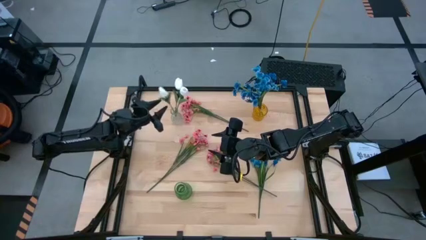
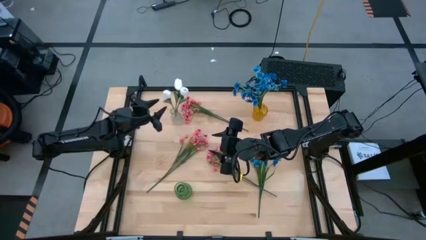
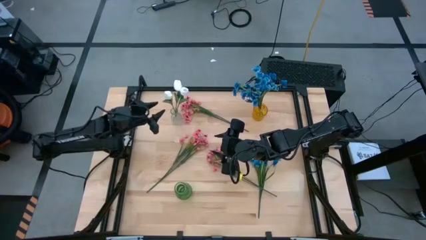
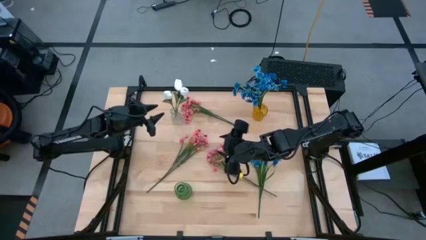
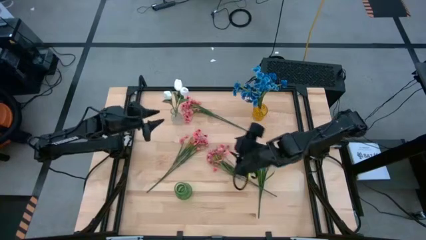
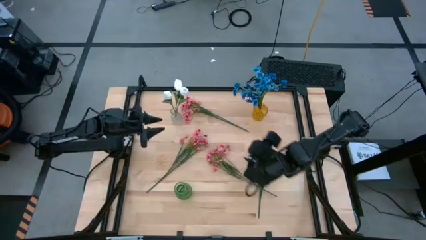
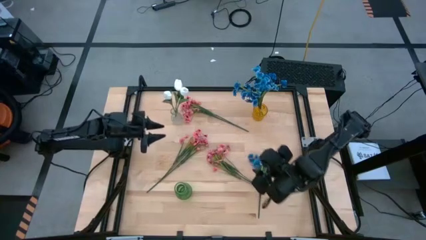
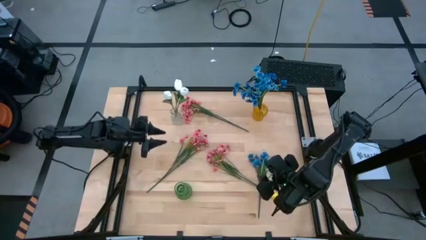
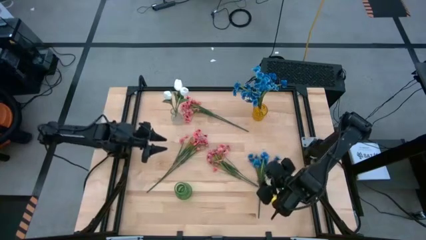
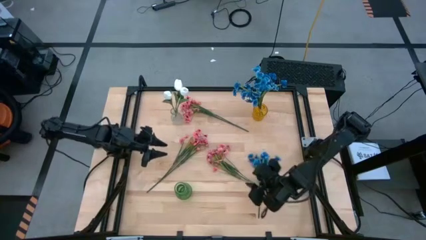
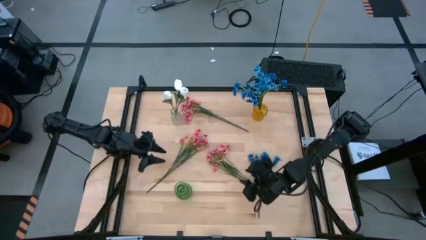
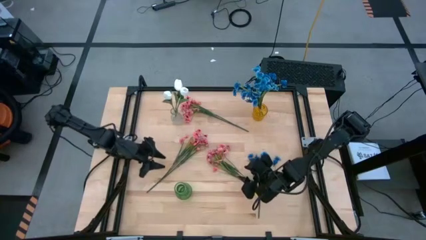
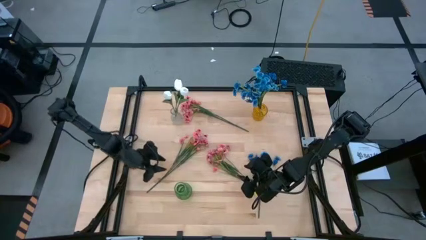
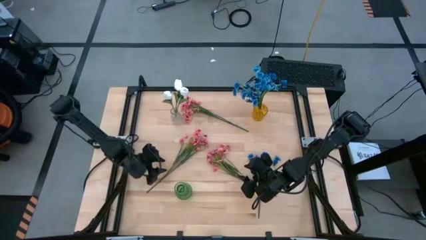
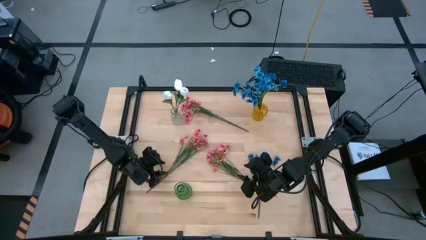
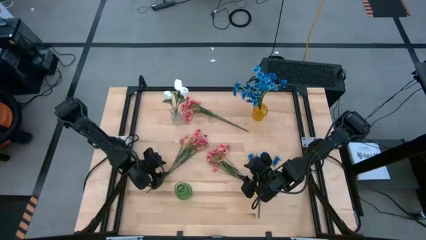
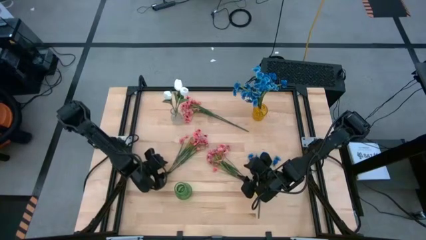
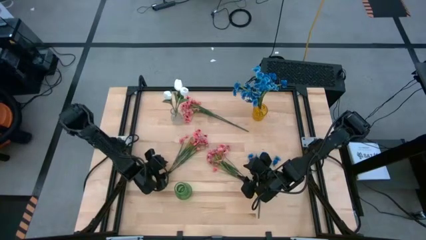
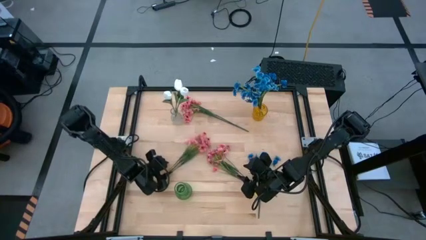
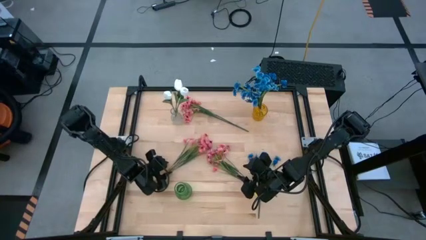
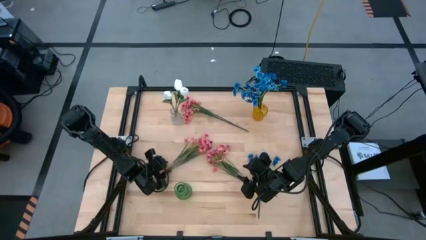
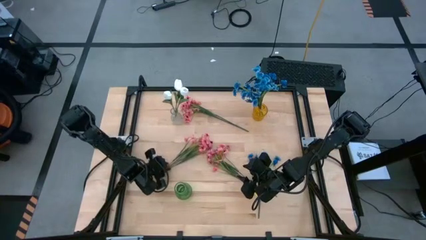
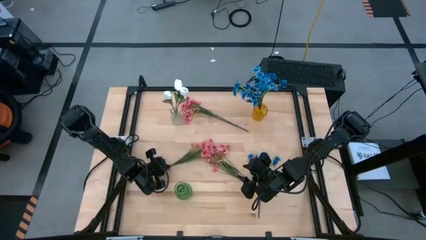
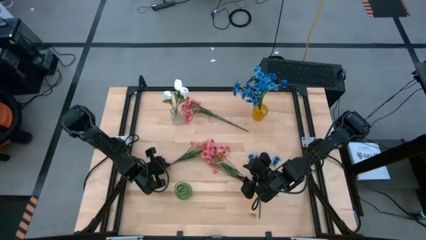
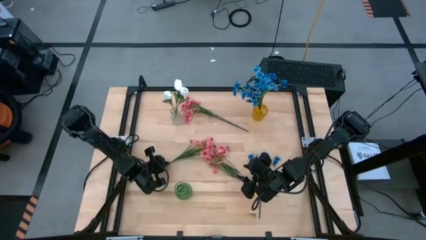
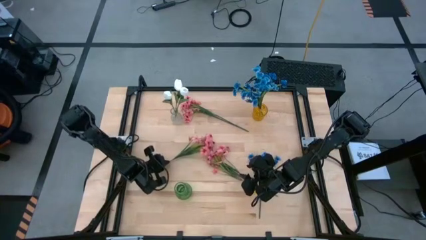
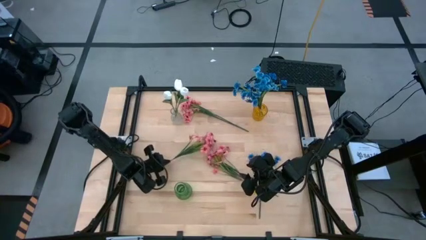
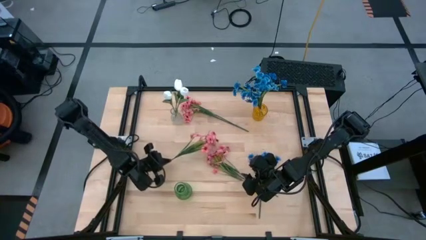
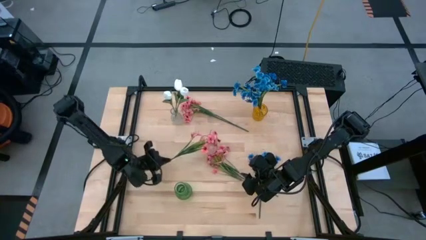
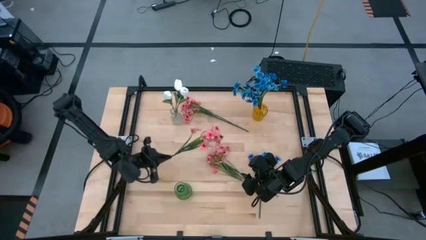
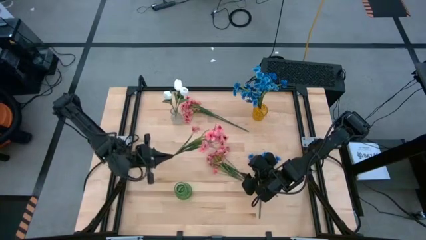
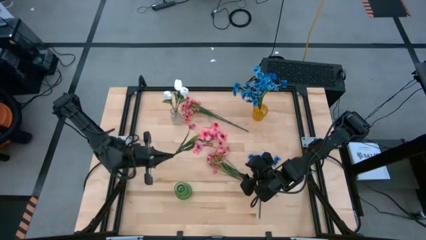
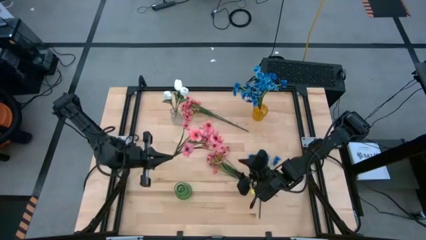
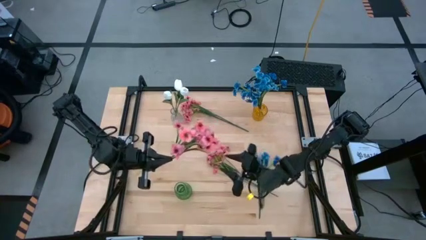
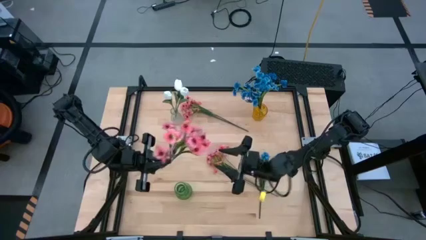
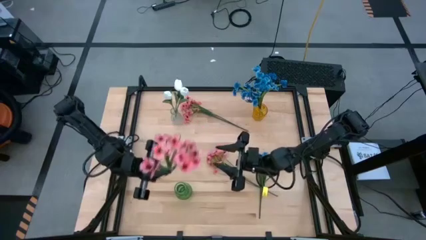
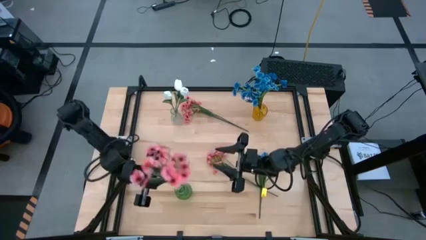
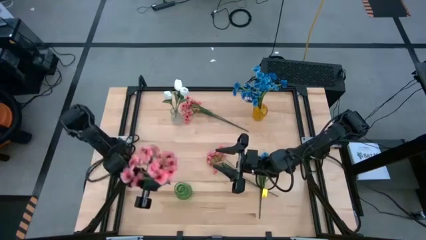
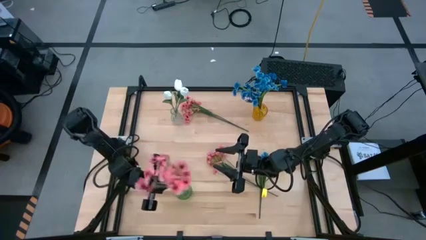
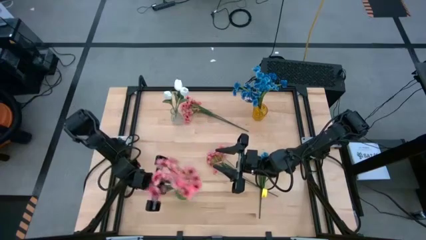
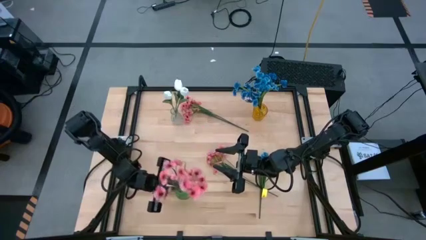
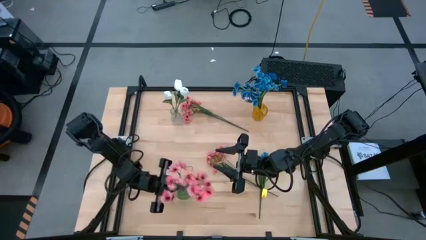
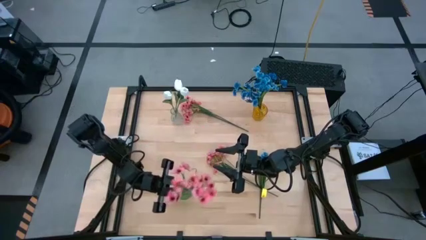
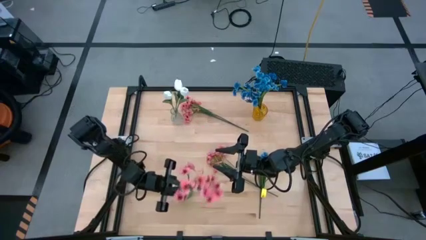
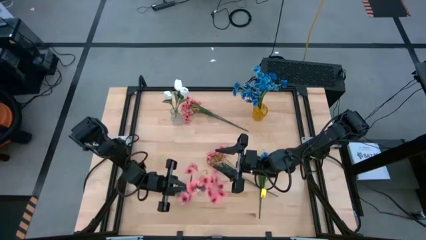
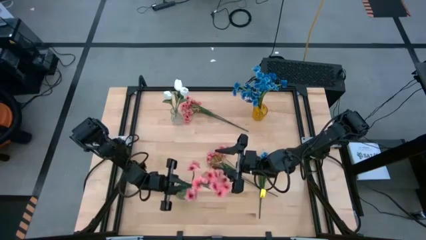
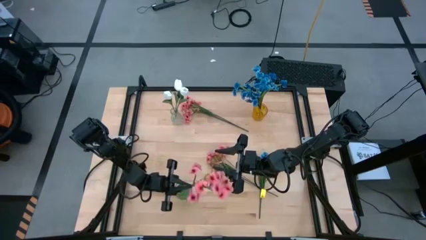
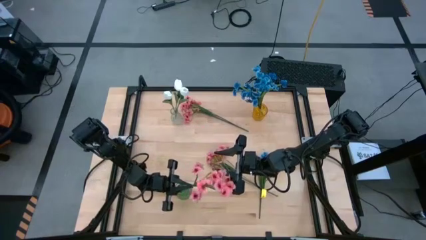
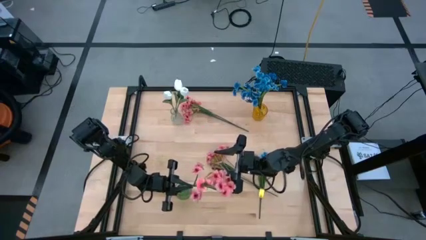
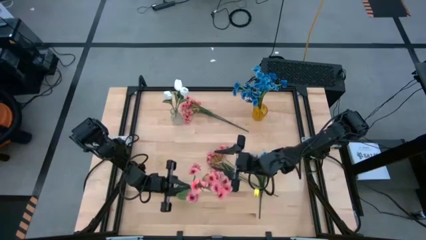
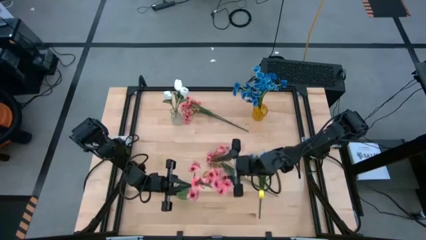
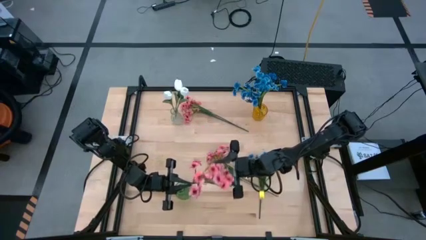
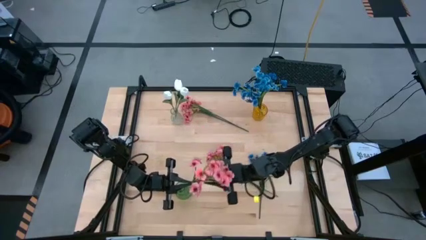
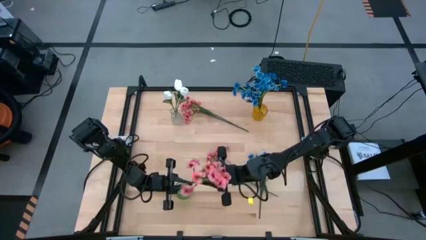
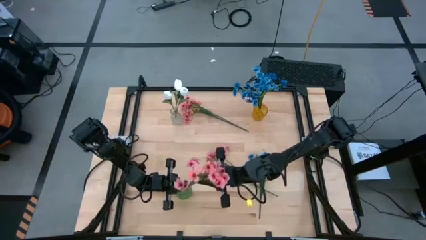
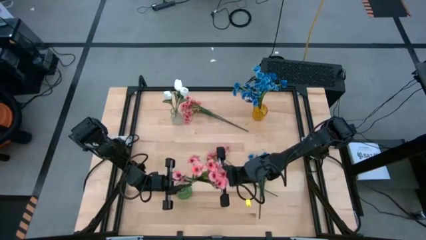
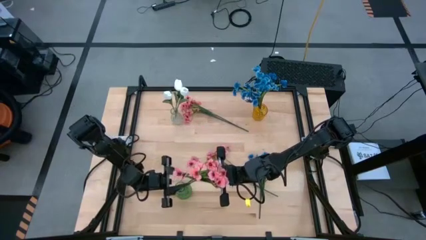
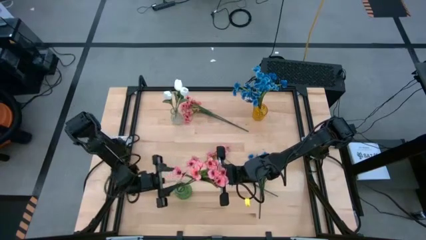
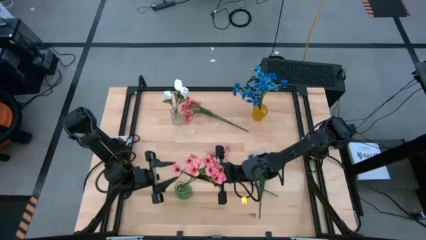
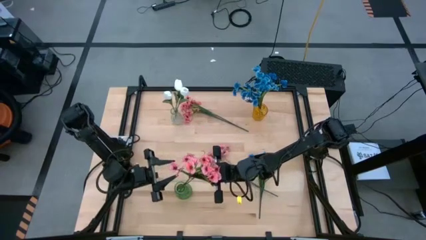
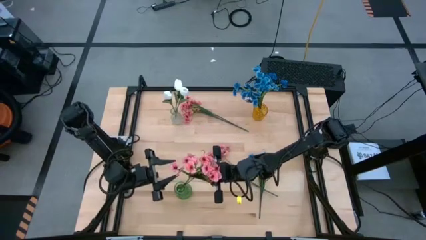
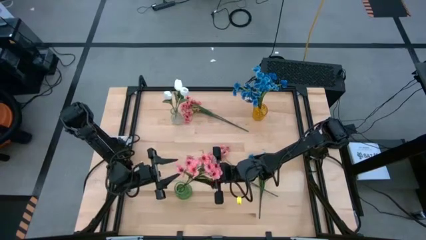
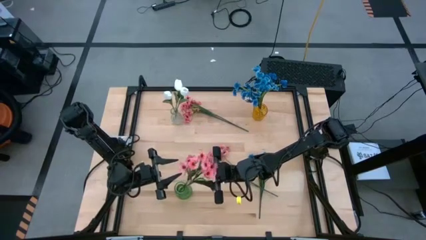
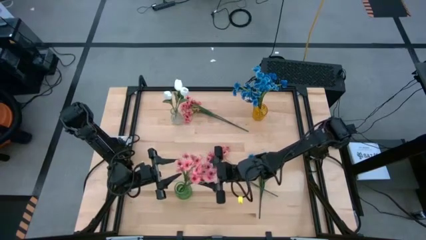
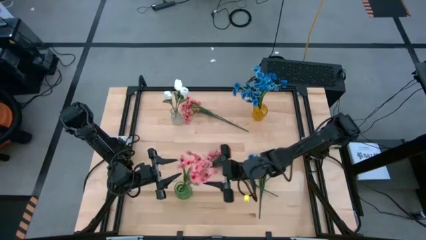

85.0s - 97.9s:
Task: Sort flowers into vase by color
Put the bottom left pink flowers into the green vase
